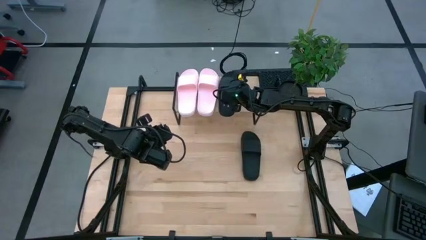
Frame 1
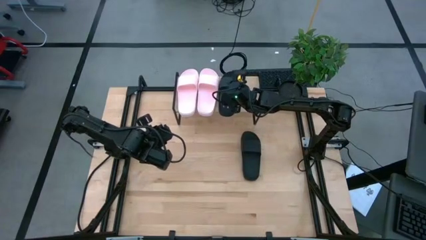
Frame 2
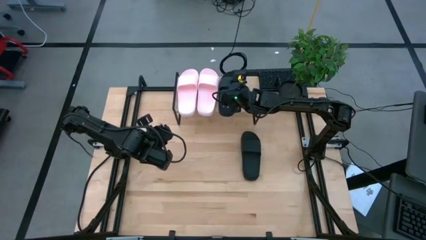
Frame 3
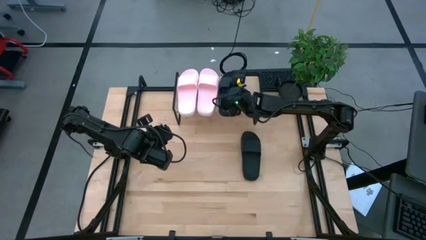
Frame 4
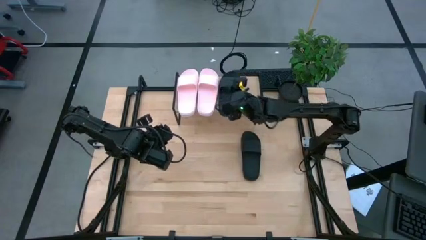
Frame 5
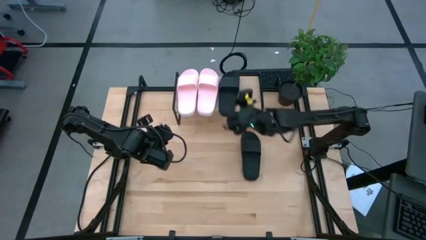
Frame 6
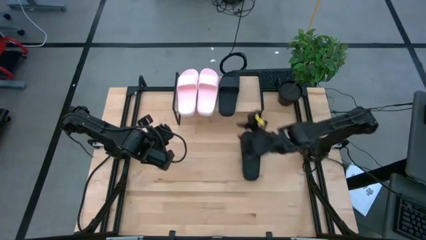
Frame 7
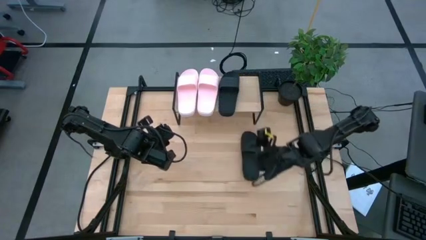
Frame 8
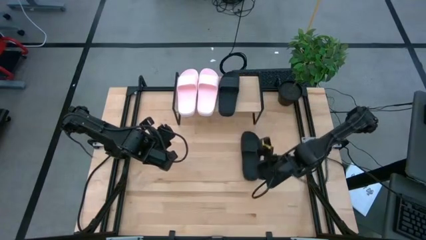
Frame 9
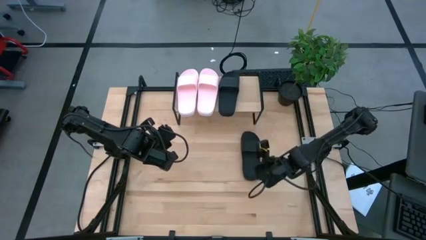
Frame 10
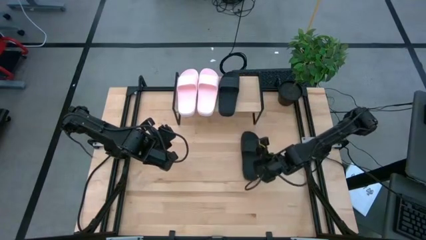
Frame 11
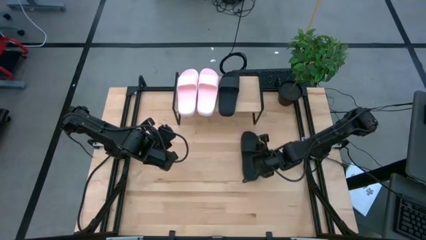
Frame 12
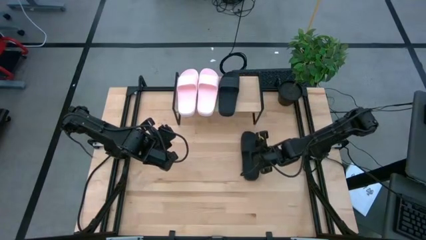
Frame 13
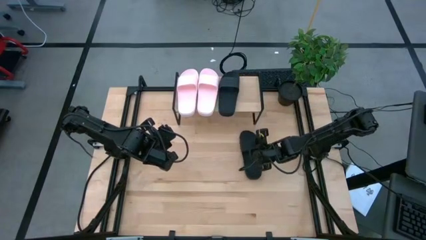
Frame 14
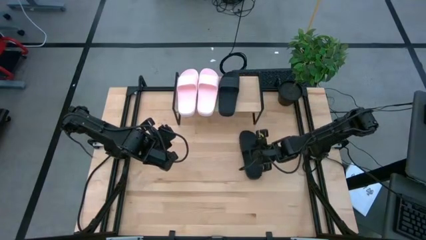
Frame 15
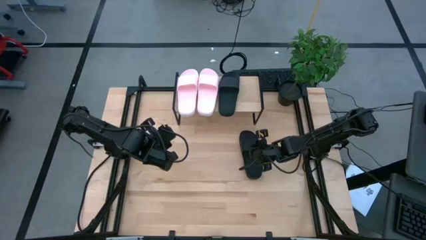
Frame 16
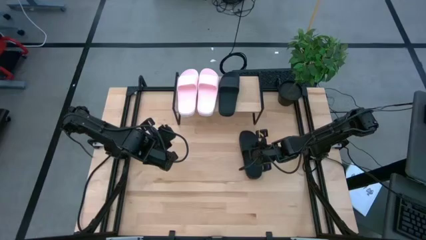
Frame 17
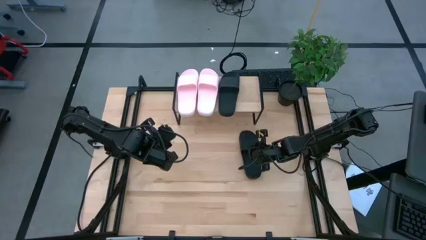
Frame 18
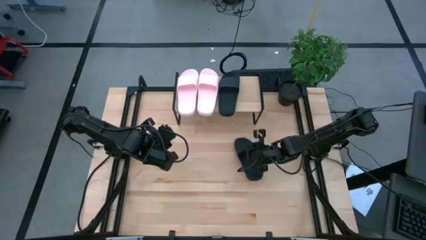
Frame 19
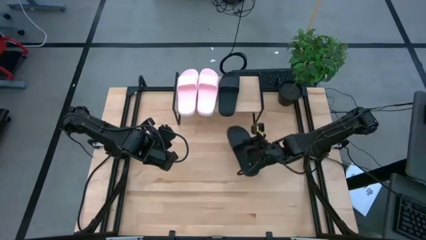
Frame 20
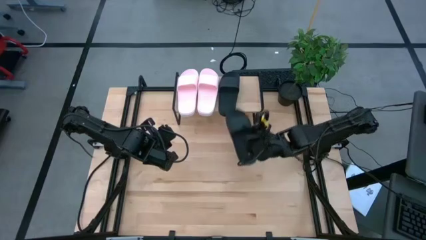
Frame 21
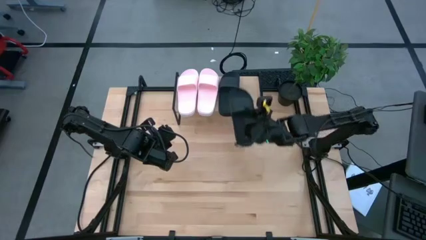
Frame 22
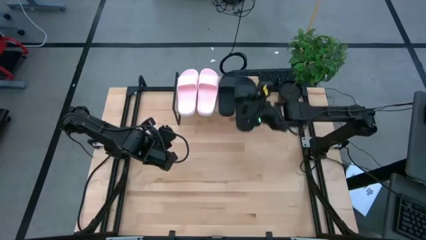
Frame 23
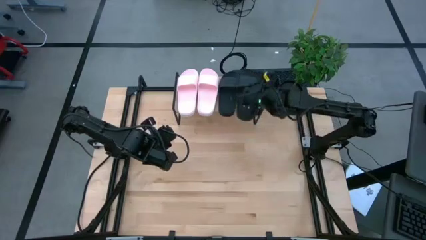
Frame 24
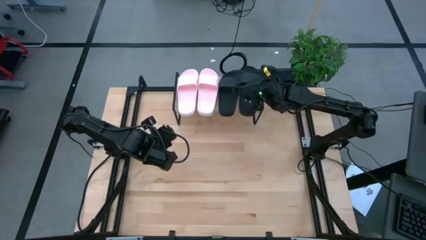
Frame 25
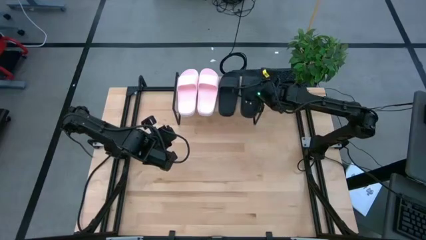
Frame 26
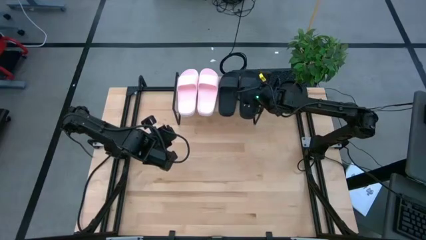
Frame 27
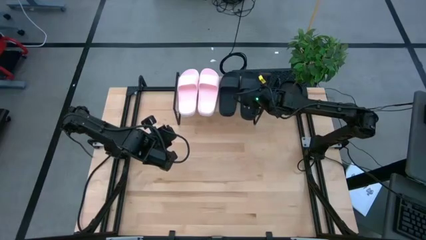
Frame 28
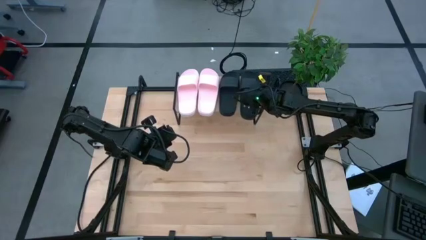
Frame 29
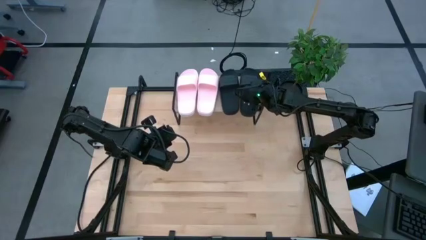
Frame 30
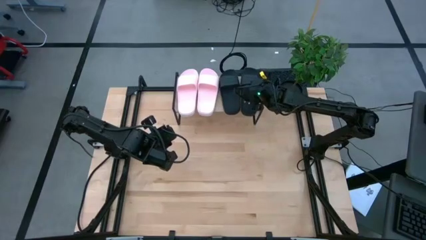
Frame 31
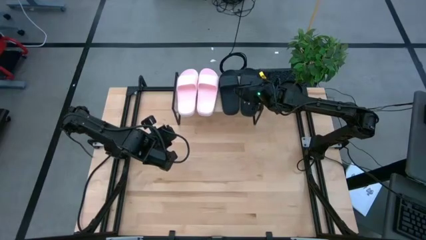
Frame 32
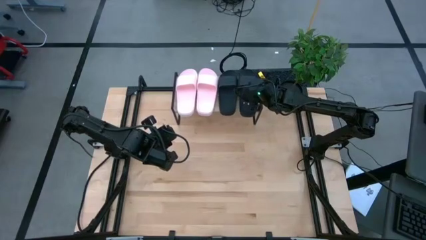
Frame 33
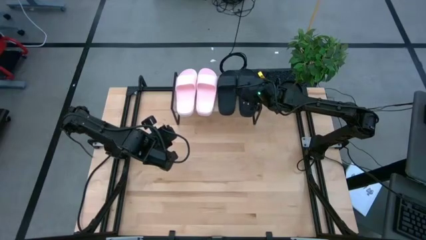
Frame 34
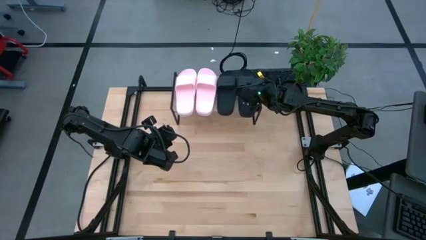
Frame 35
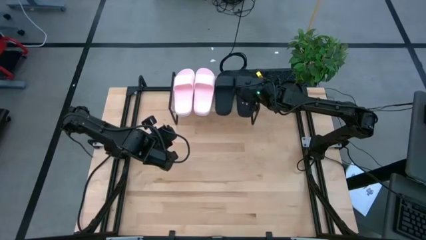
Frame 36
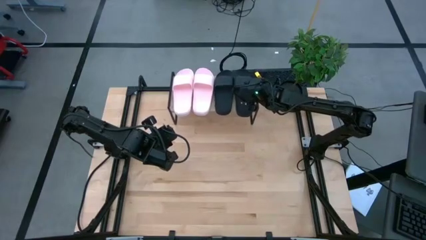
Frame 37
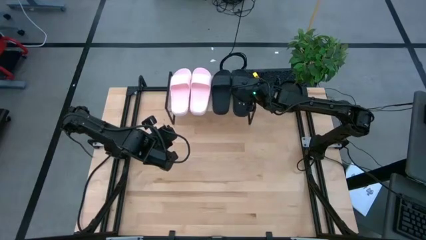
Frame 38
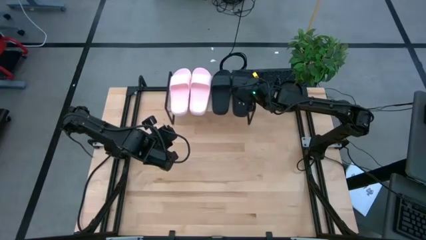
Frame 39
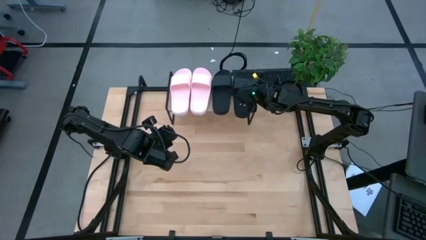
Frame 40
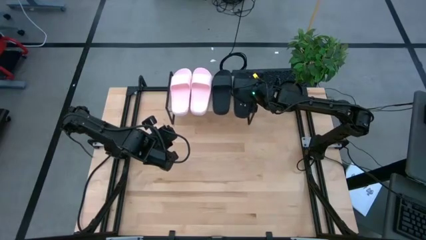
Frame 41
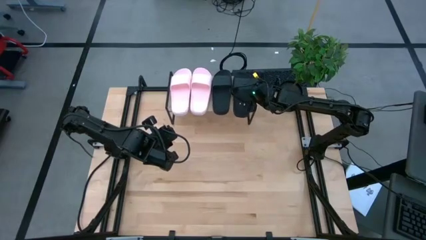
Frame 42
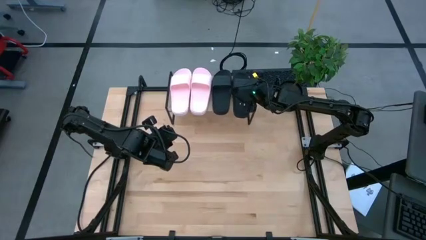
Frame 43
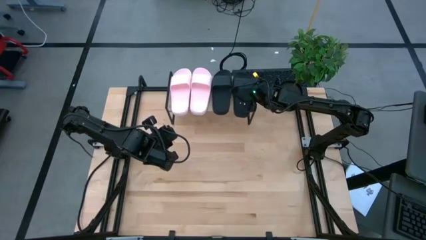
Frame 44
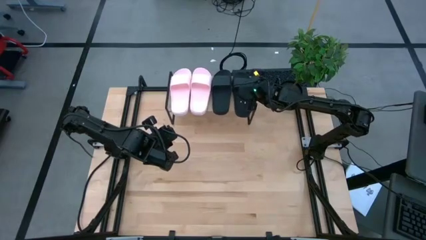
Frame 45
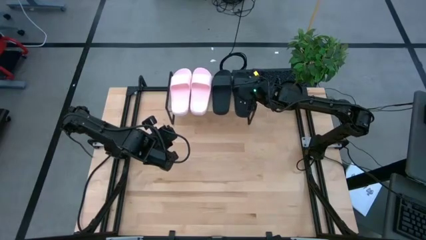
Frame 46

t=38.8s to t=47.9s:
Task: Pick and place slides into the shelf
Put the black slipper on the shelf

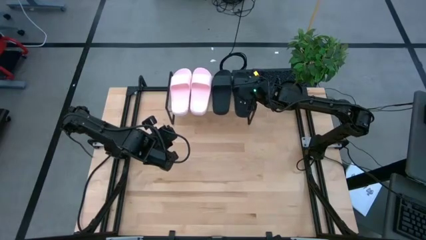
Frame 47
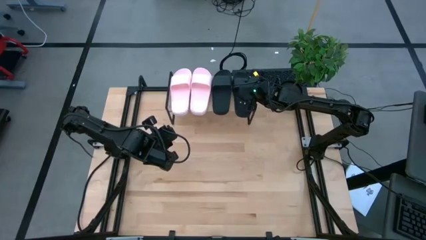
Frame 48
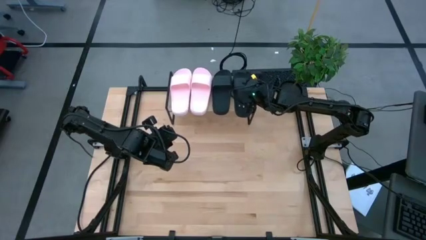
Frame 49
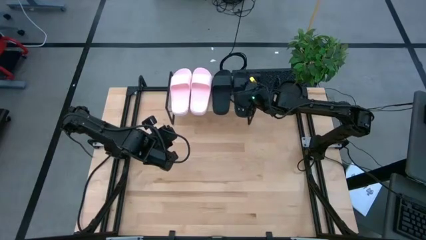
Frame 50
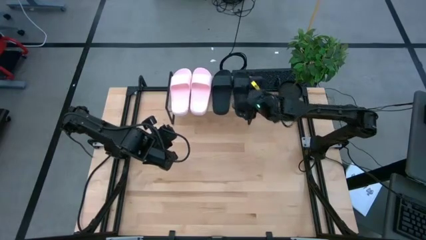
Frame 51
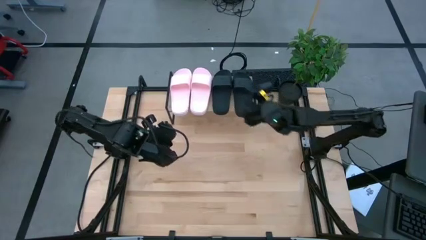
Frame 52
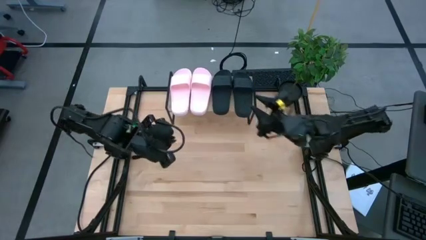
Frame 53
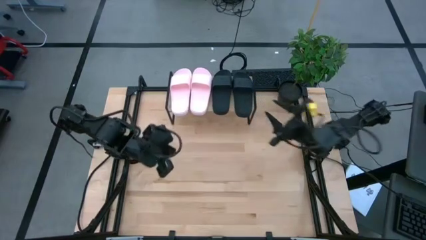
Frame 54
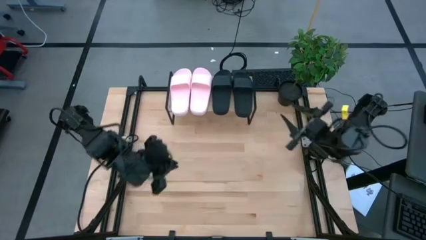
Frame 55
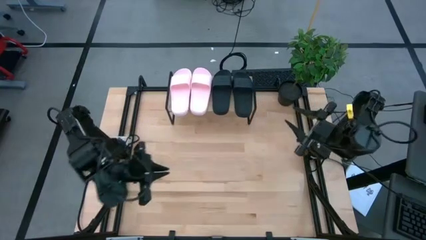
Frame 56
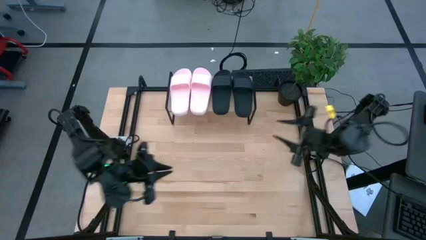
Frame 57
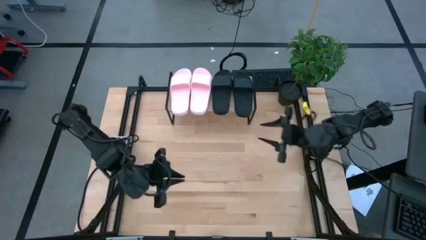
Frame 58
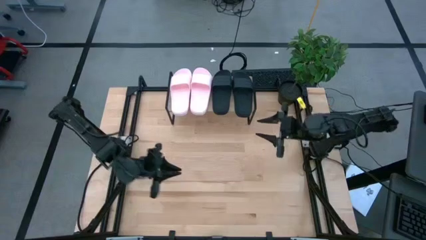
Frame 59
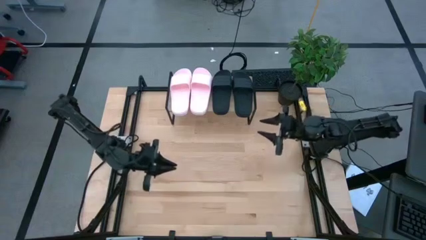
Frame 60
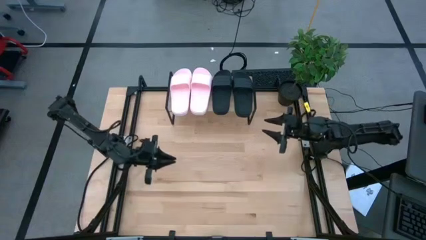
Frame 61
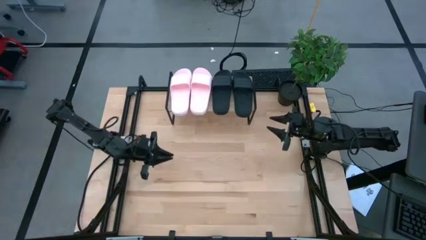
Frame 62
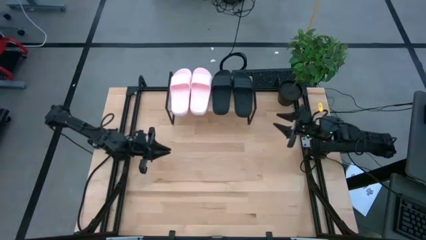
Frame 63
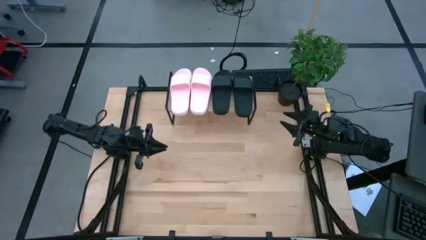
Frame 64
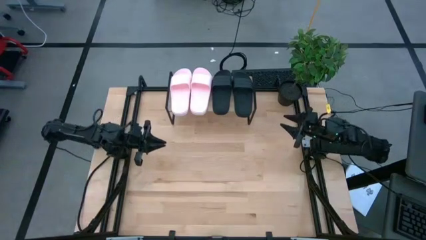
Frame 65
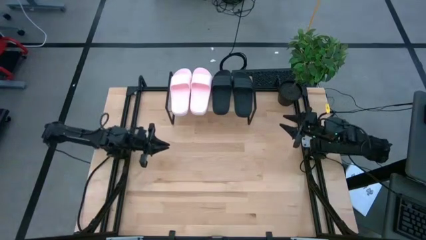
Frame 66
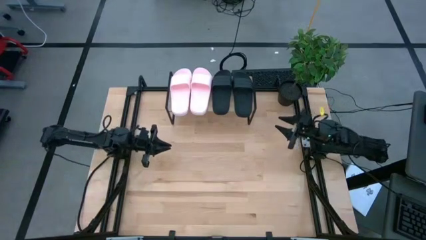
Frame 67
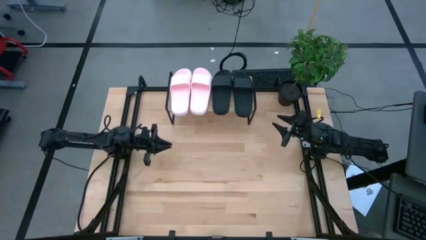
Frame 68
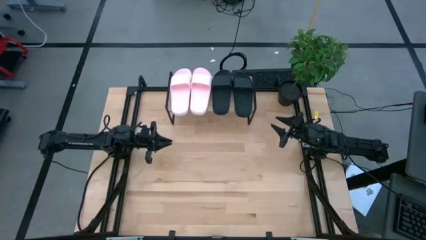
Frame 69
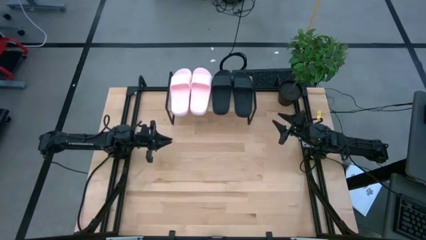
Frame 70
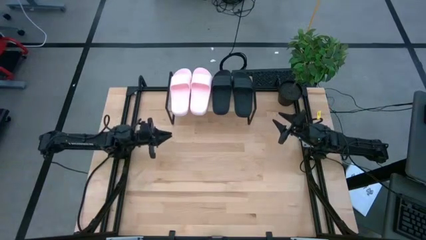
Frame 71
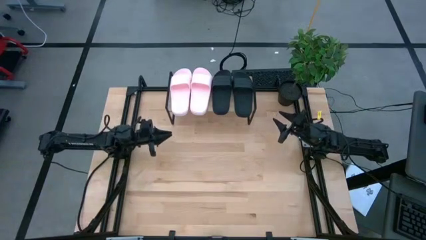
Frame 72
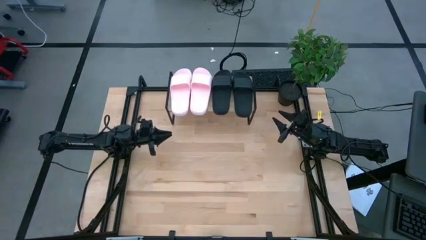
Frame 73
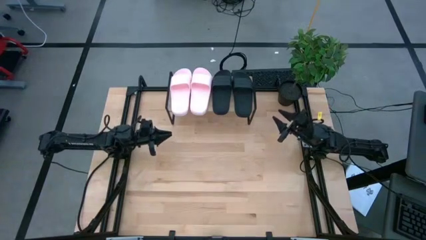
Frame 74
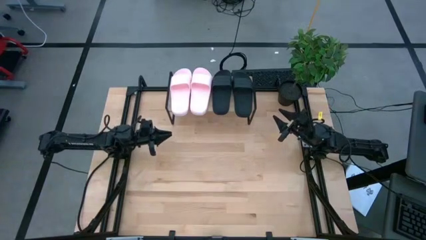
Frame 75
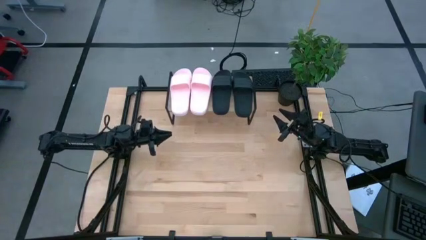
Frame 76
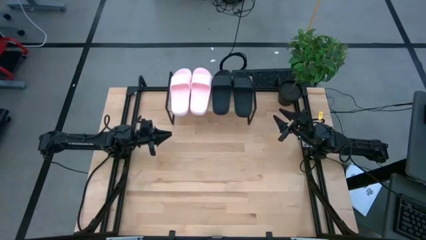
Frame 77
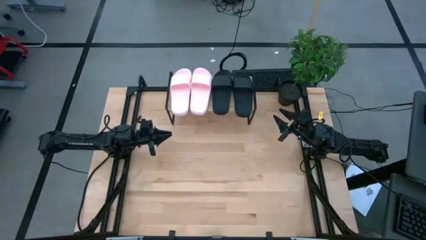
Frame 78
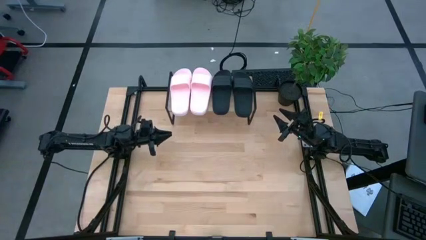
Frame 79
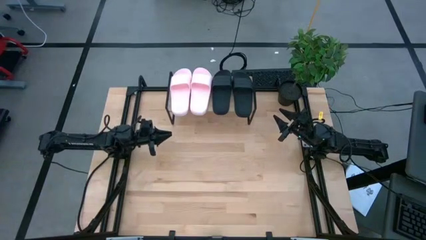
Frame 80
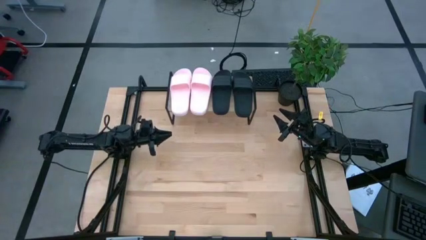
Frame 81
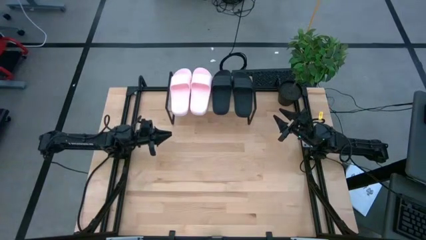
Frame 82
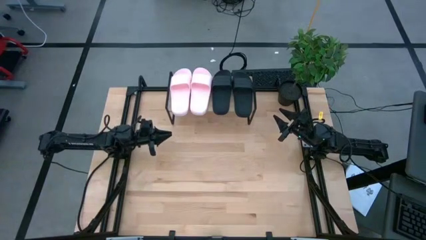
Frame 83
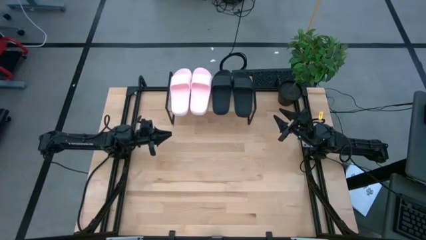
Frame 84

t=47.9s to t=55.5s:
Return to Home Position
